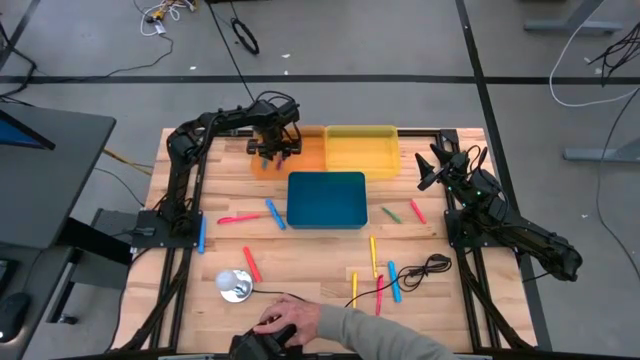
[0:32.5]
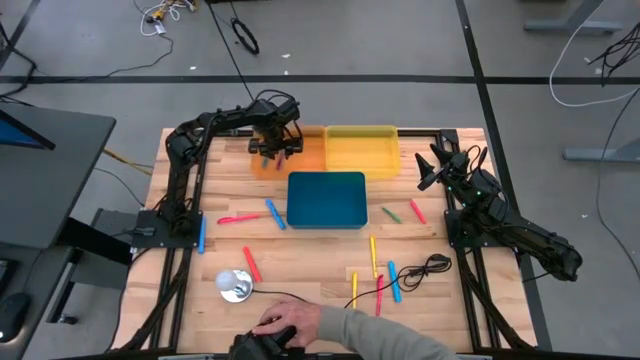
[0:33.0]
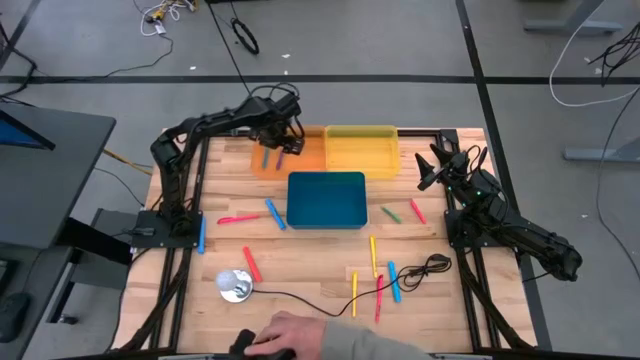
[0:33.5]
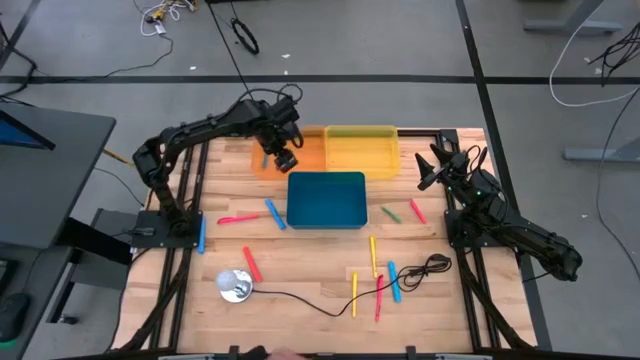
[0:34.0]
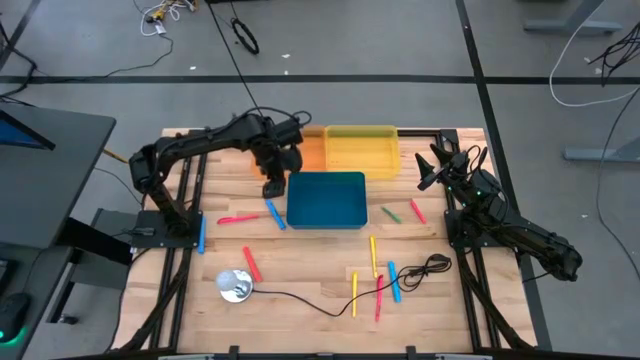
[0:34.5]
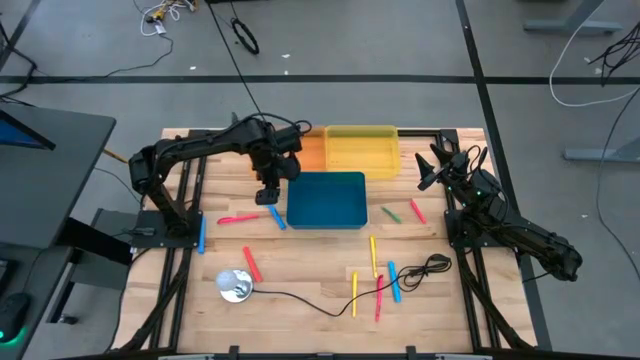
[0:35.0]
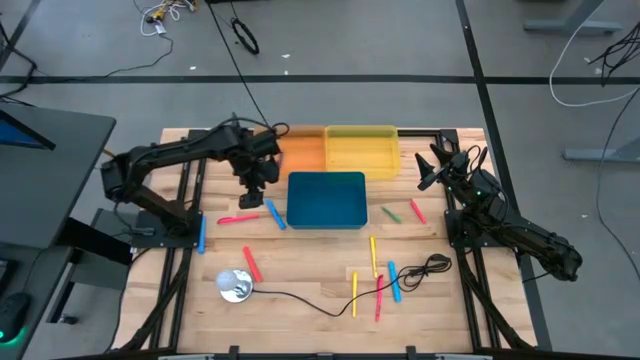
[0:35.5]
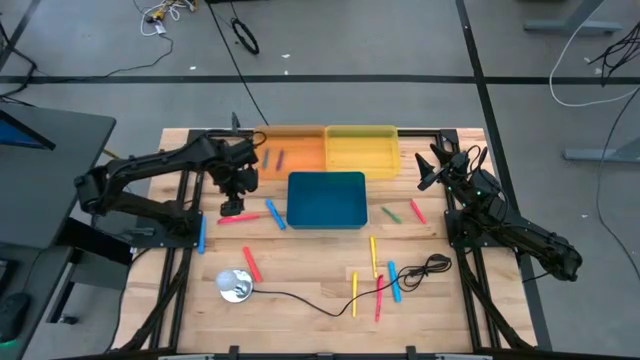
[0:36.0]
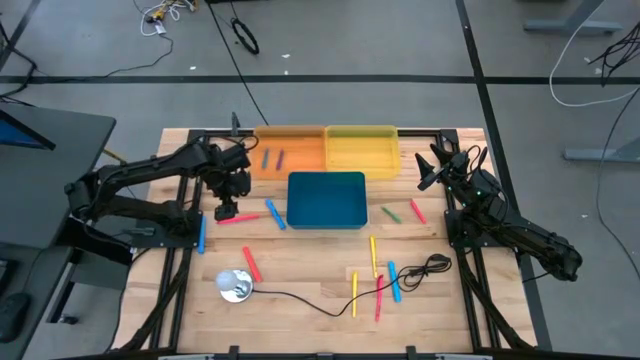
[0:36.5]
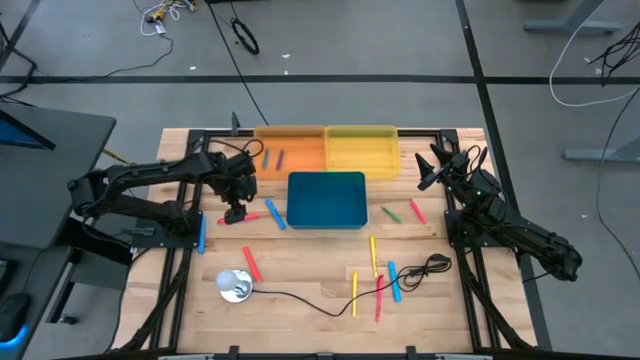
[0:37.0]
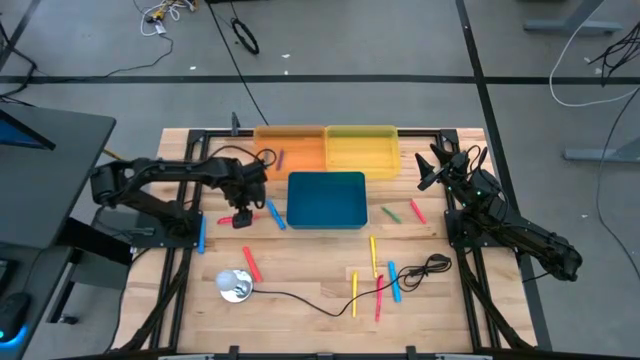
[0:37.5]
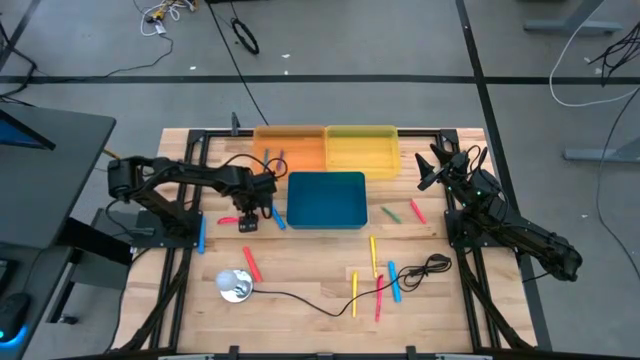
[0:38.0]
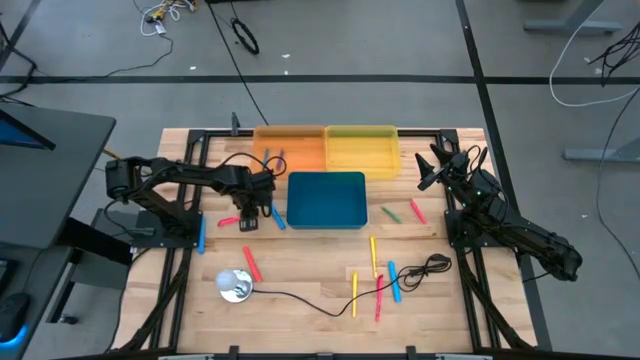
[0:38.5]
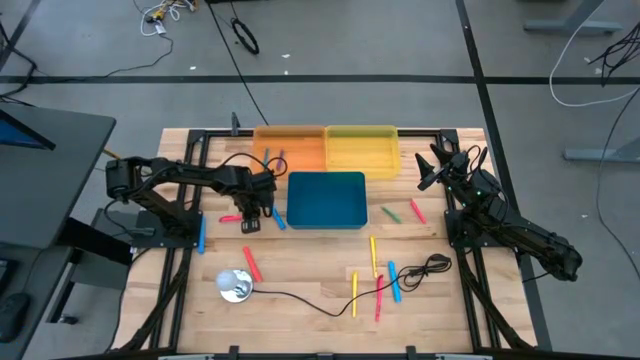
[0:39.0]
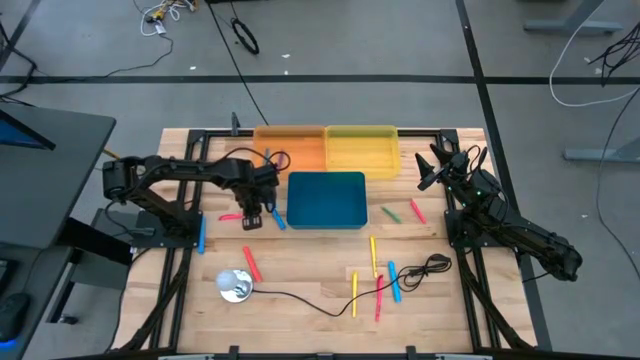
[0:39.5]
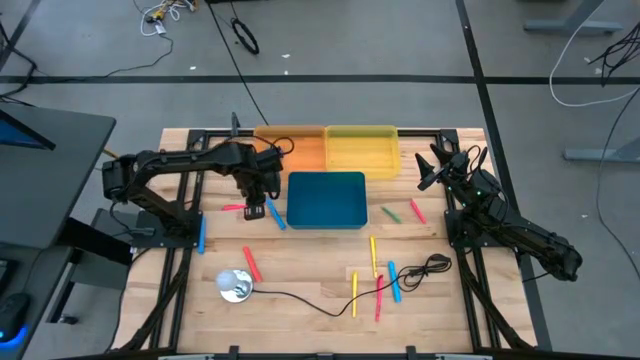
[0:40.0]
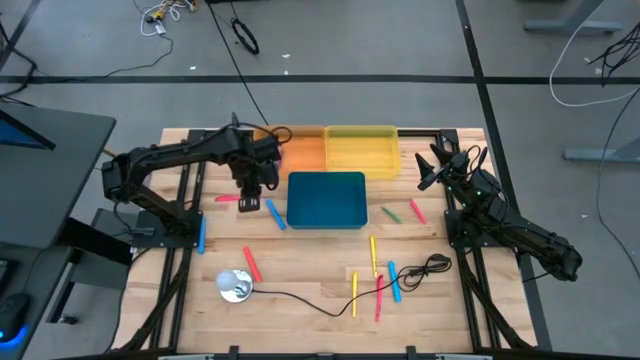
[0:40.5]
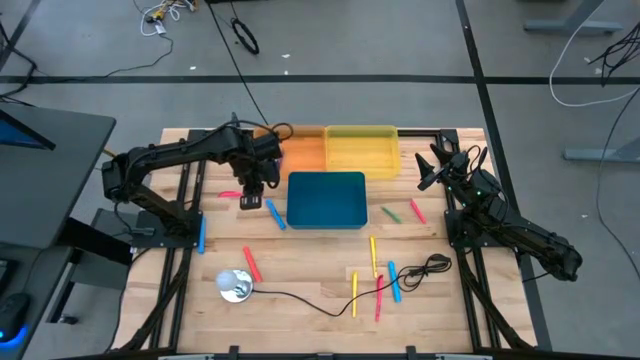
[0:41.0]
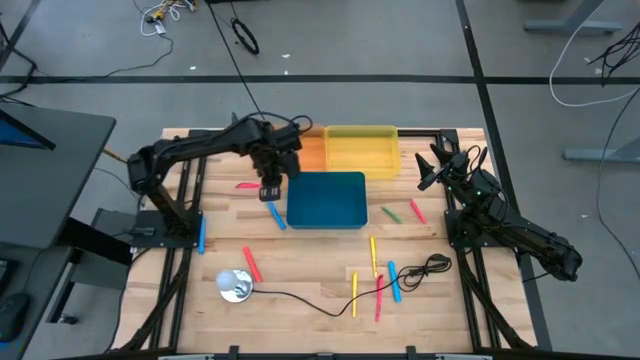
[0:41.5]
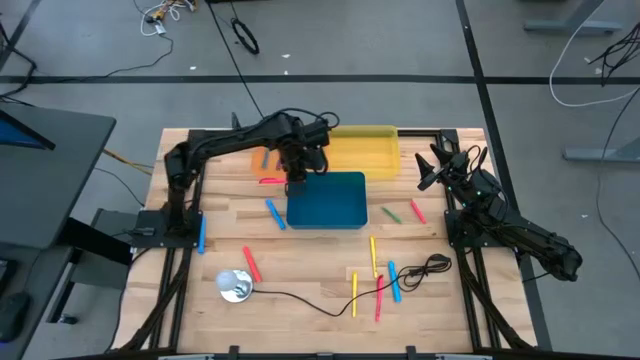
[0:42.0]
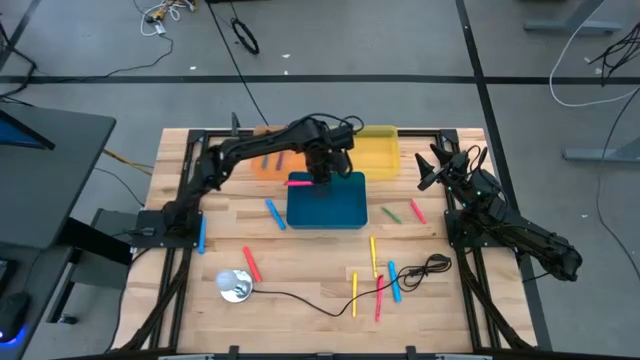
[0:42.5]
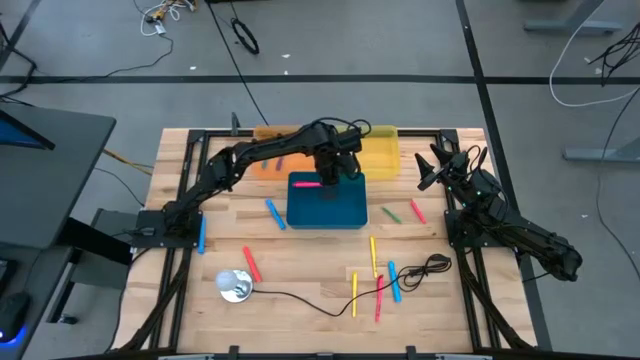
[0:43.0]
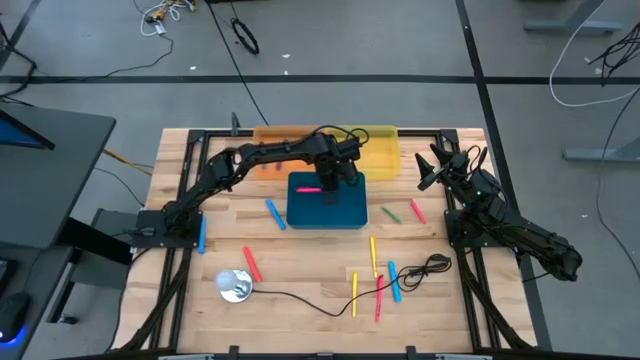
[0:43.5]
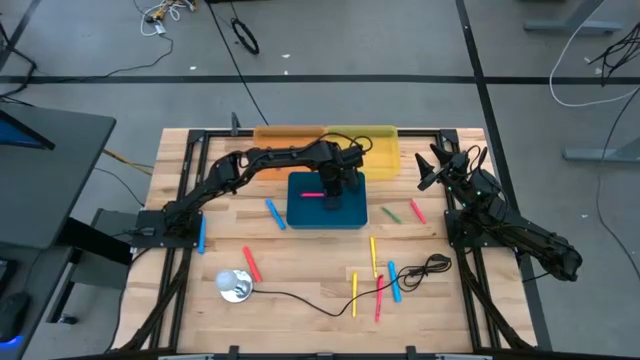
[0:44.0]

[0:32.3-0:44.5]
Task: Pick & Place Markers
Put the pink pen into the blue bin

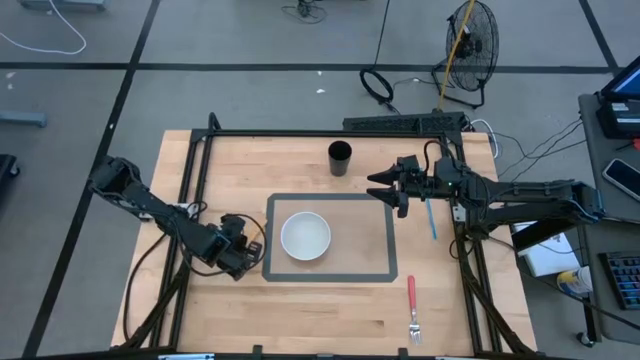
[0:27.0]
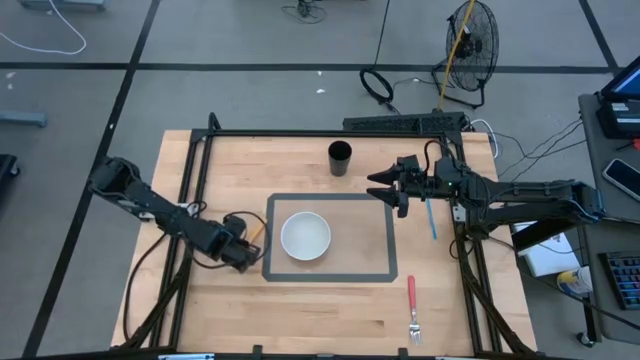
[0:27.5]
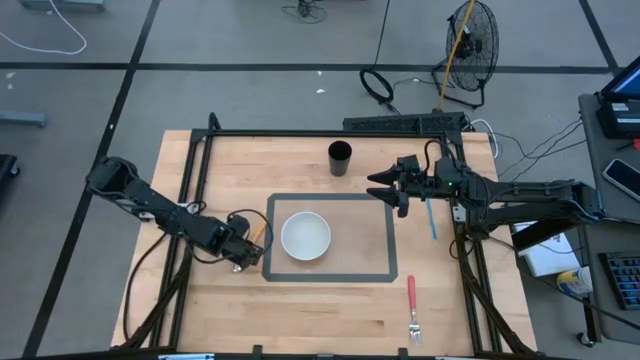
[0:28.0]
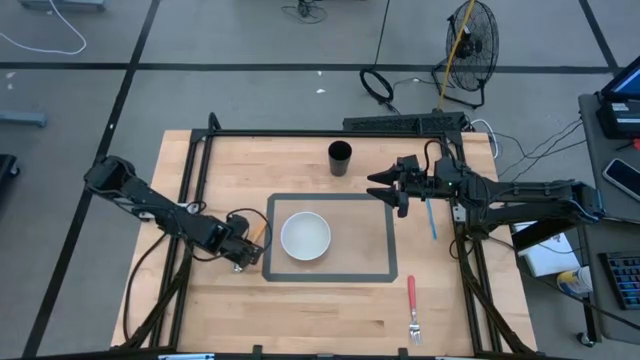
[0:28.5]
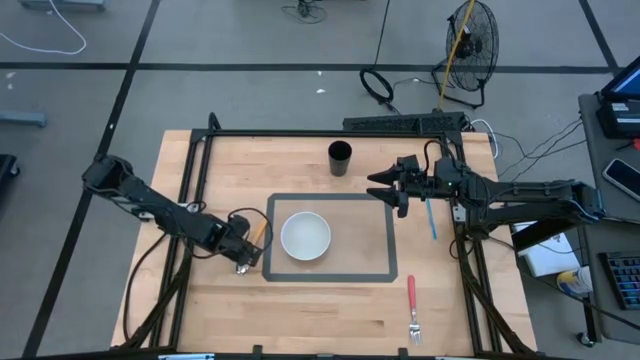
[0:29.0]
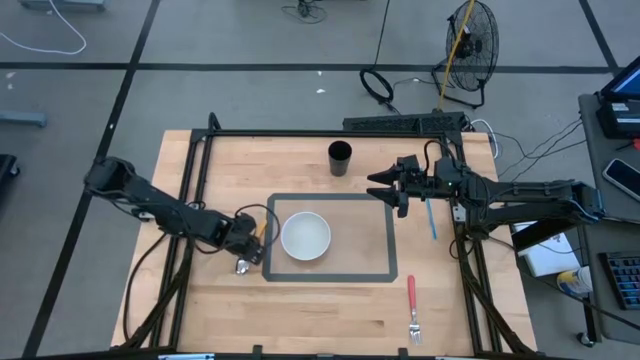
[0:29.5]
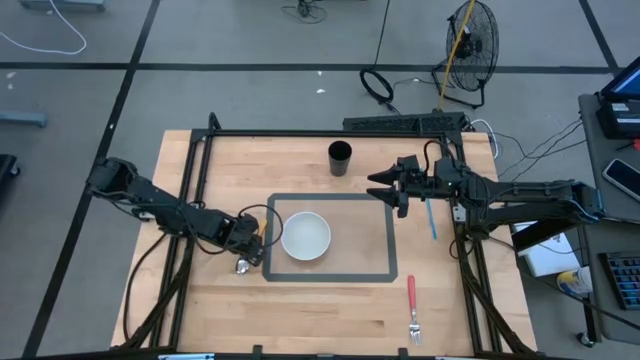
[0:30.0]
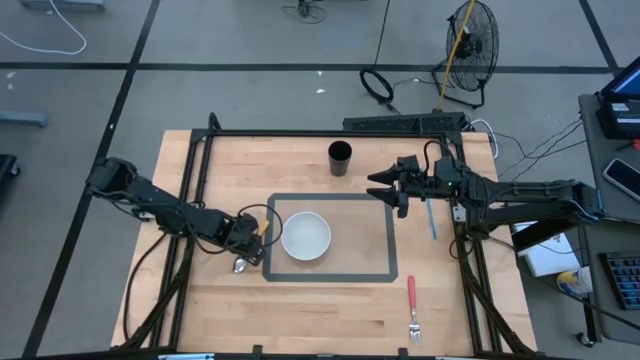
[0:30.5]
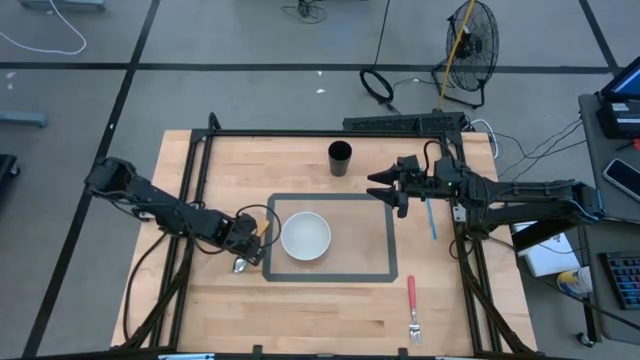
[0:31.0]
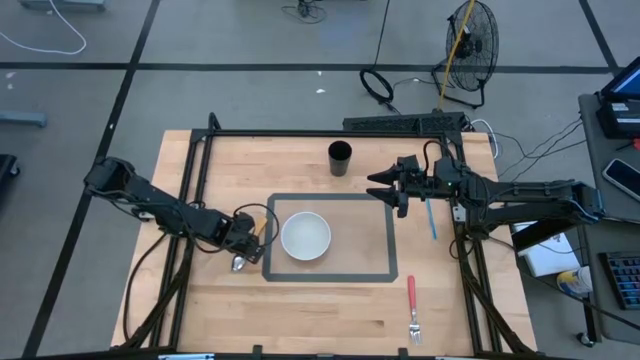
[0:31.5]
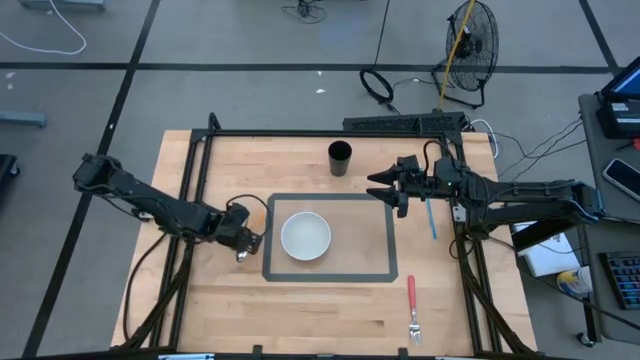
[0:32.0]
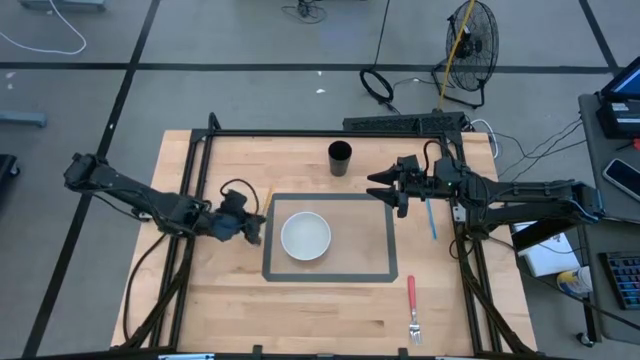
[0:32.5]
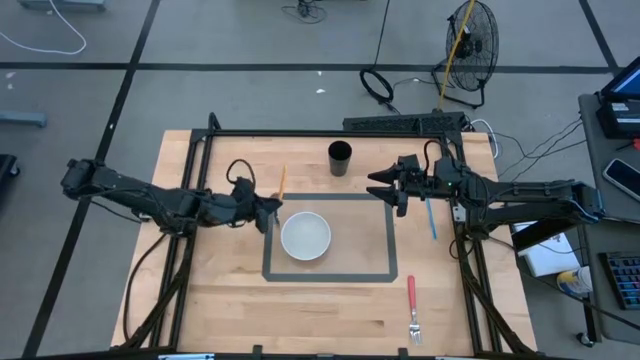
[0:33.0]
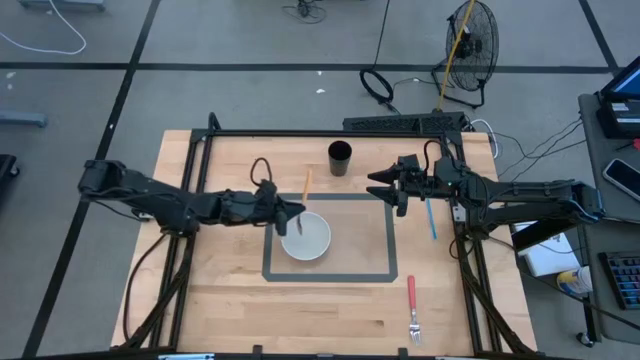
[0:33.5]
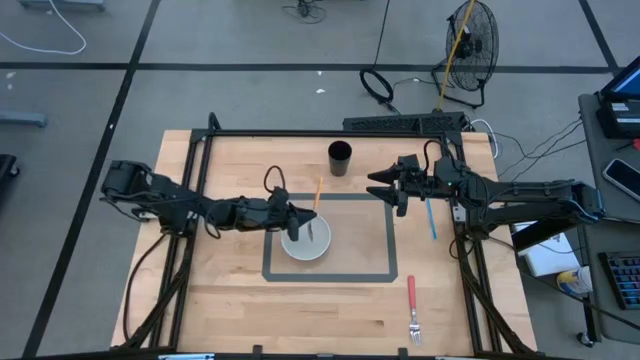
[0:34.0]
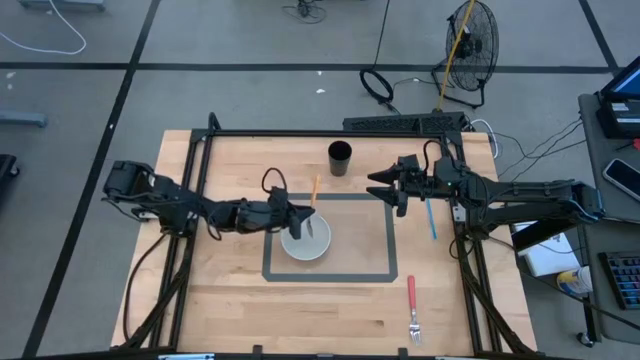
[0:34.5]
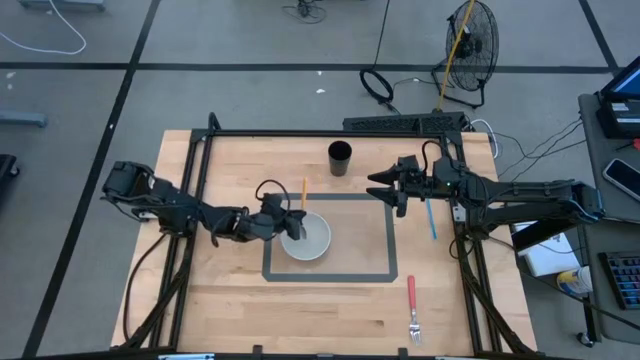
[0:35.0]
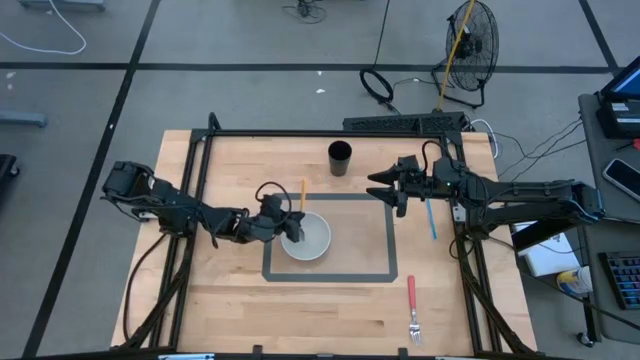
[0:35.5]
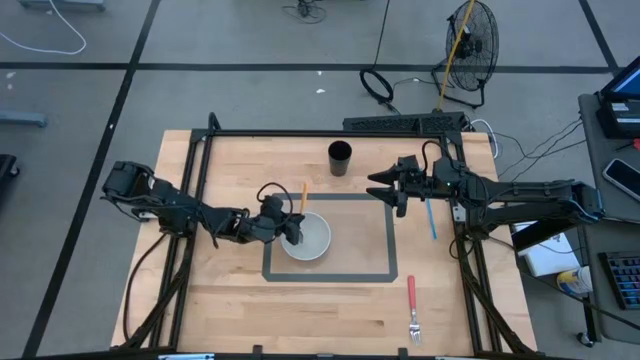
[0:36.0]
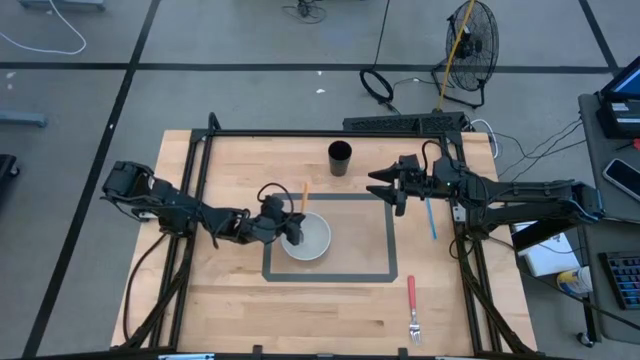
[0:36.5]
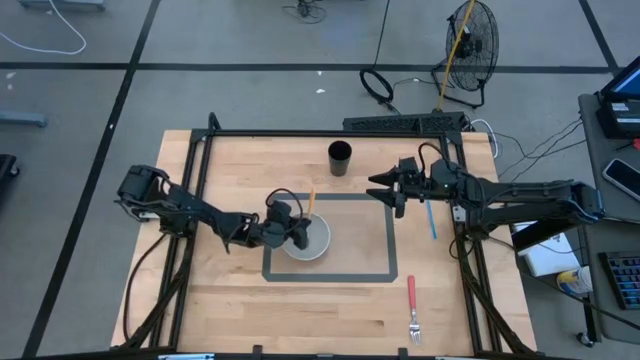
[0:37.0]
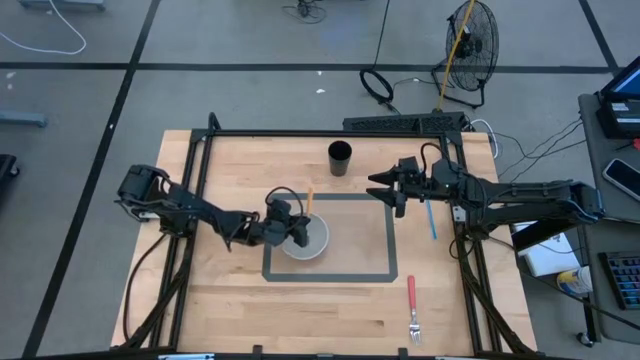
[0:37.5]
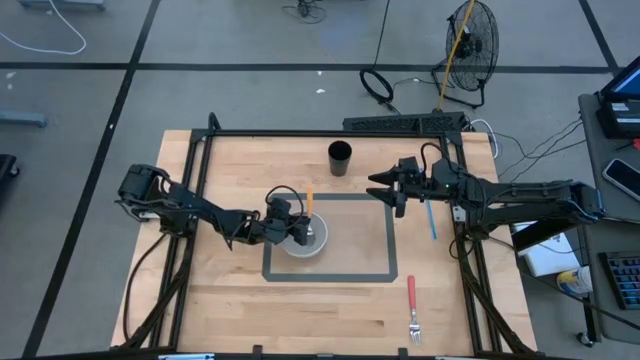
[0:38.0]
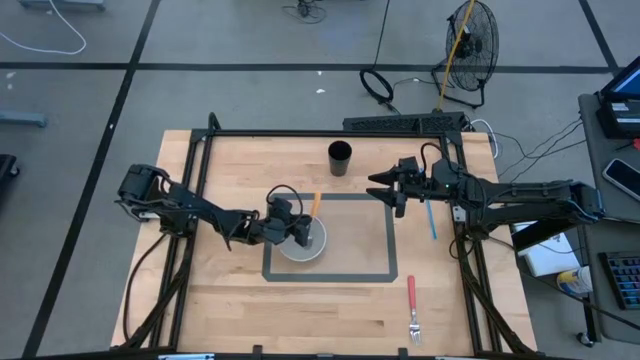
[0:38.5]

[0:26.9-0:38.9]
Task: Pick & Place Utensil
Put the yellow spoon into the white bowl on the light brown mat
